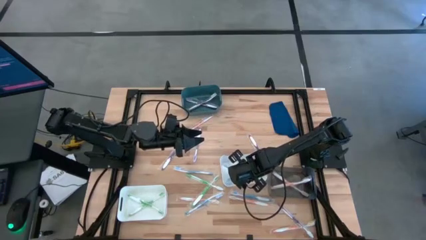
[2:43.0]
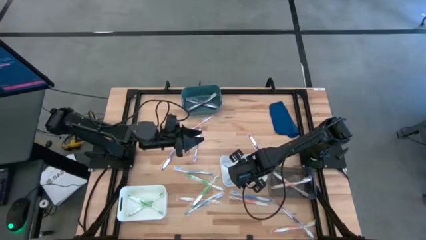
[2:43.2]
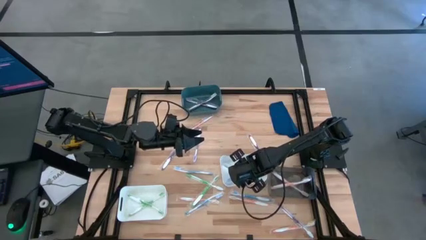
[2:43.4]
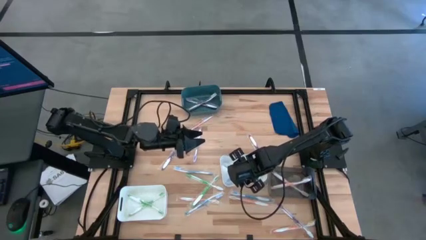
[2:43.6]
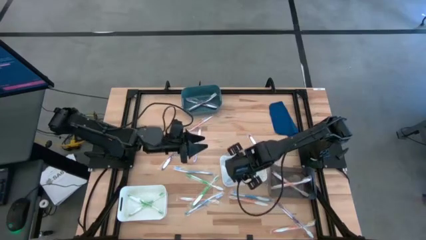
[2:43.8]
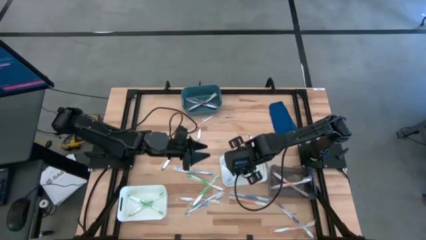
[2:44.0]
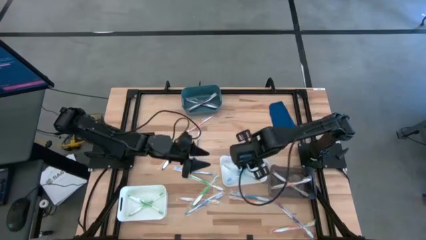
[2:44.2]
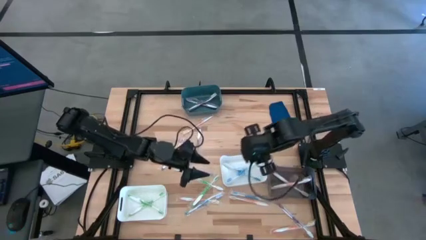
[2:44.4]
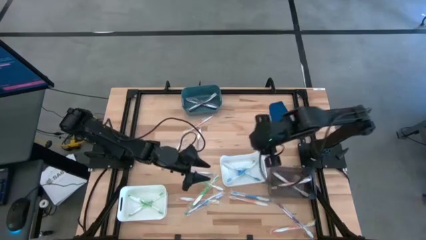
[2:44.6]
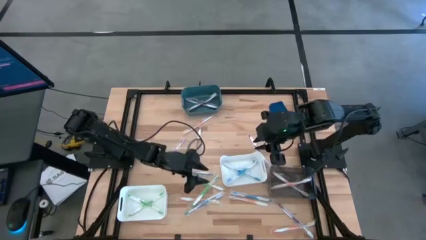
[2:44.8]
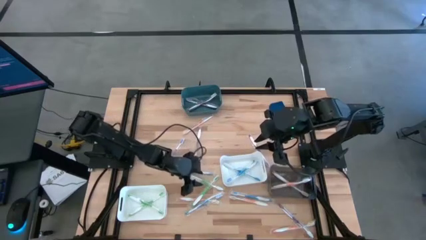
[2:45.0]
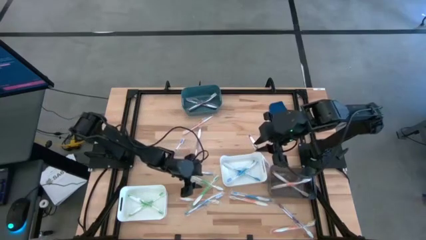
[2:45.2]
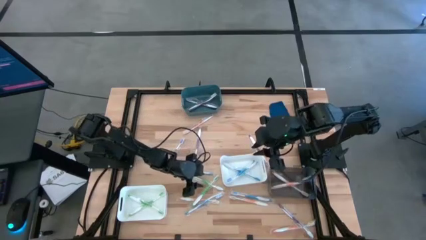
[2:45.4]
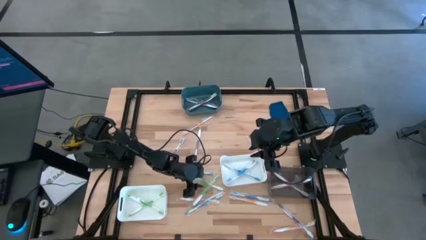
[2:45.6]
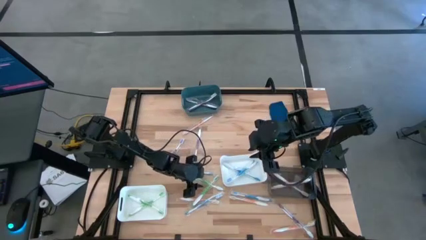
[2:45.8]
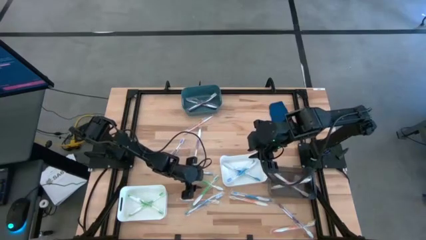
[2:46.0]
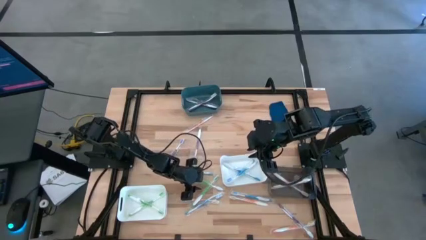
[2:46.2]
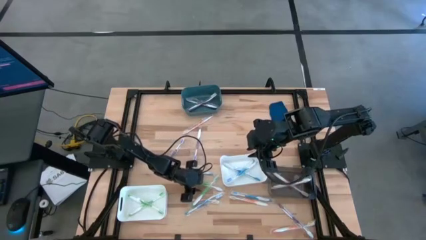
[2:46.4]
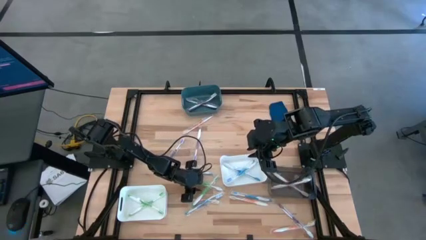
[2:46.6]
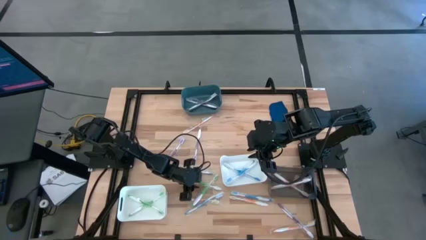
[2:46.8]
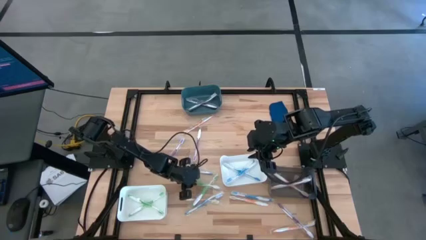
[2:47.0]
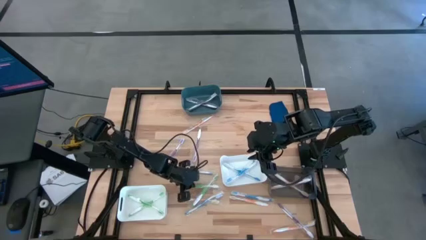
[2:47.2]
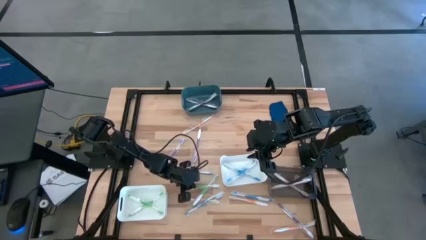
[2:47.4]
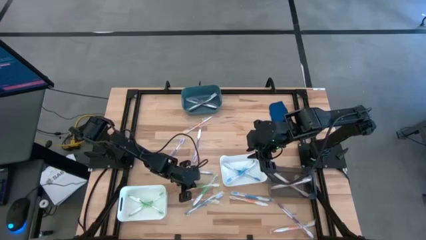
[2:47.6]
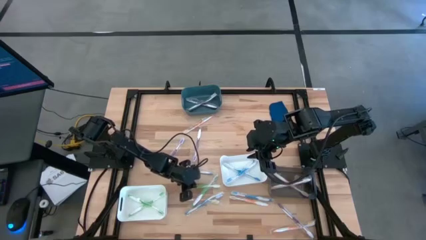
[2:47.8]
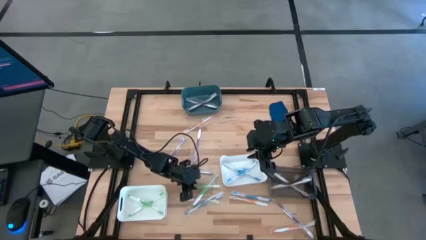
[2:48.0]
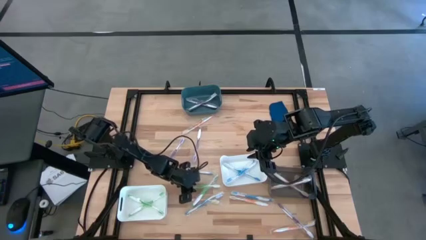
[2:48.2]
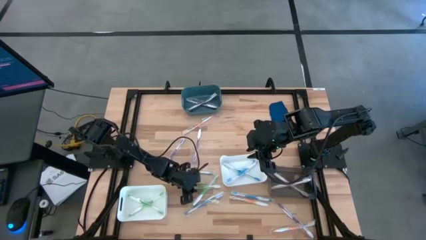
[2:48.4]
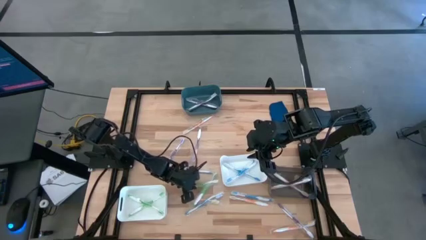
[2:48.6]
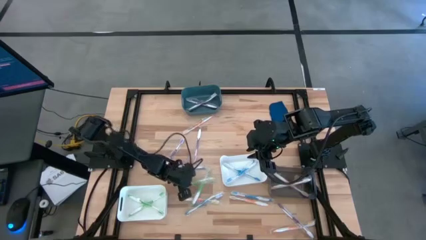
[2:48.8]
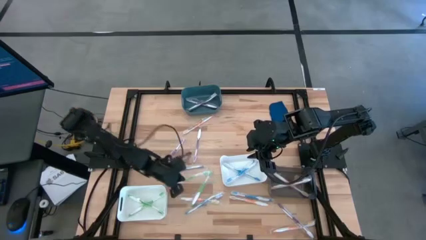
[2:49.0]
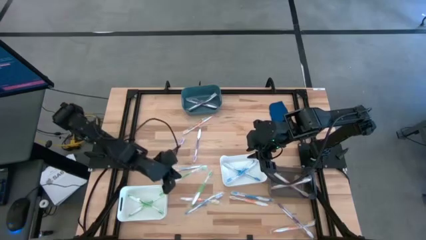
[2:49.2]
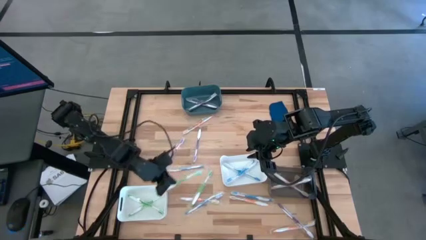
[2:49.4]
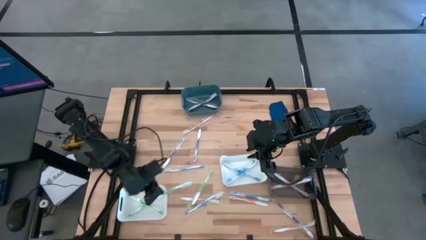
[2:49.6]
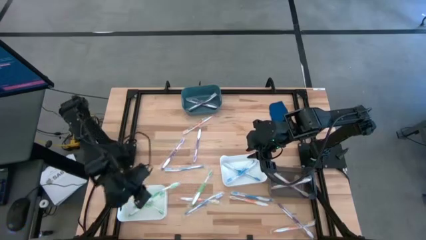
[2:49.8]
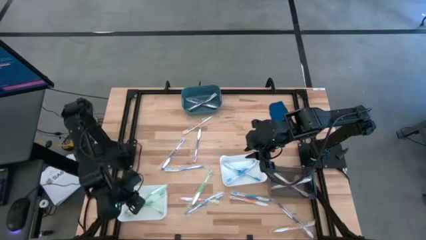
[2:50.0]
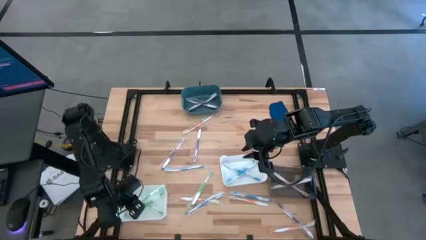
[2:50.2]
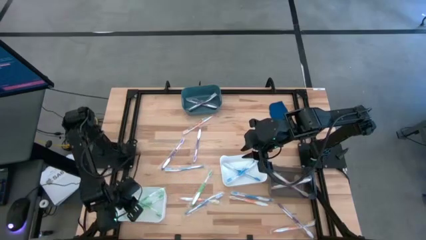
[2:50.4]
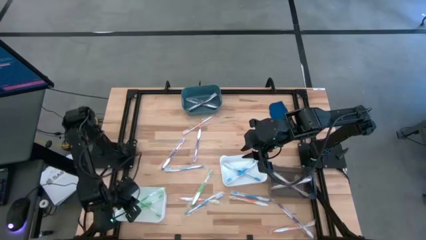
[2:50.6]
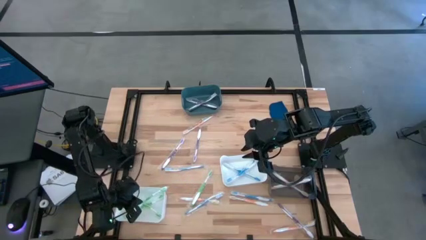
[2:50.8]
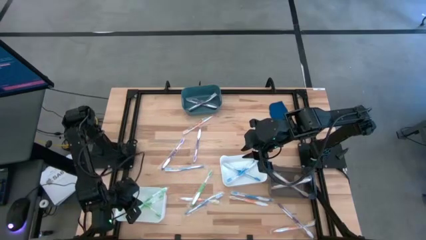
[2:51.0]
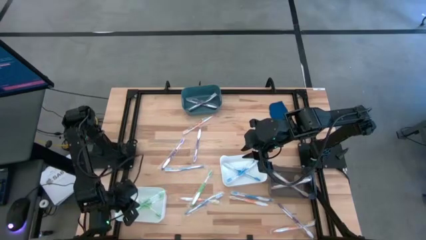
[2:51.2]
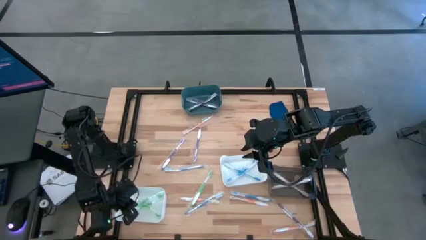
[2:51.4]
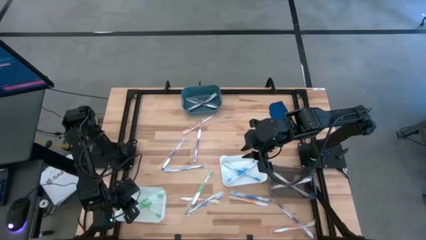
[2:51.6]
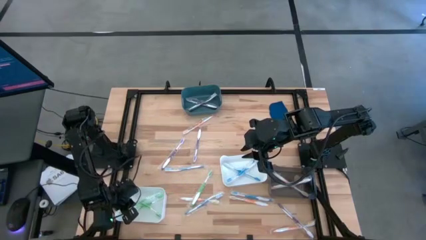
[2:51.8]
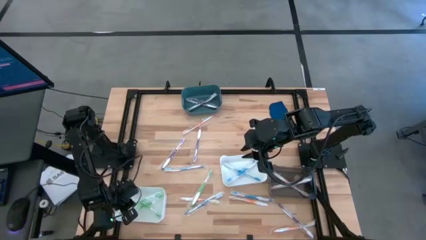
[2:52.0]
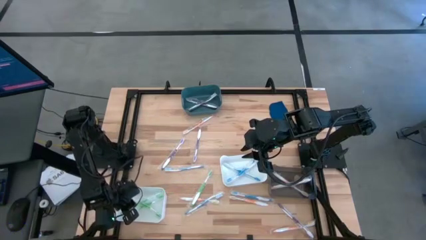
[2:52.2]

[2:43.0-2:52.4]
Task: Pick & Place Toothbrushes
Put the green toothbrush into the bottom white bin

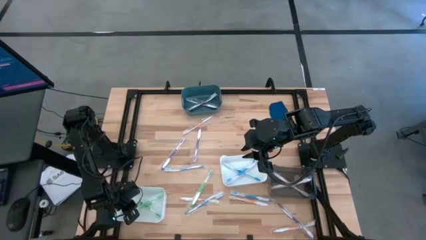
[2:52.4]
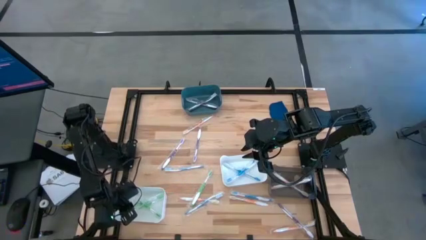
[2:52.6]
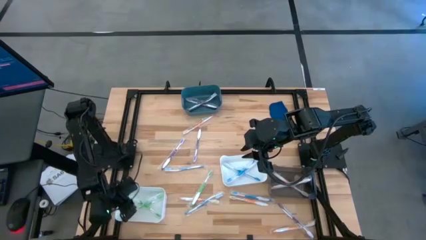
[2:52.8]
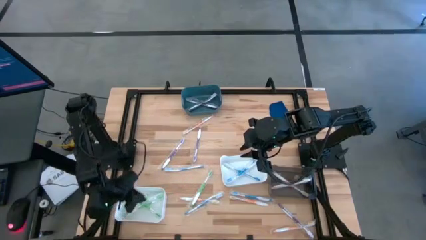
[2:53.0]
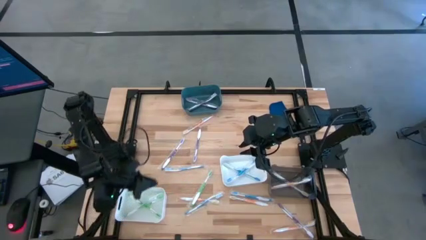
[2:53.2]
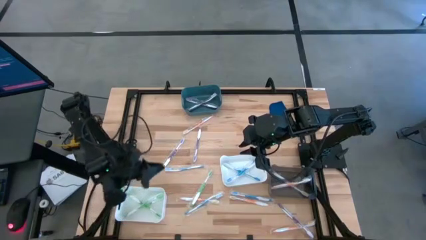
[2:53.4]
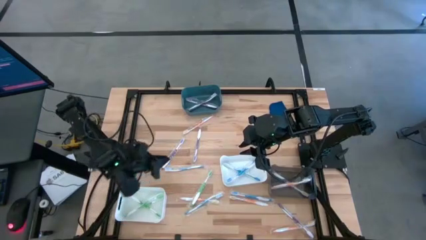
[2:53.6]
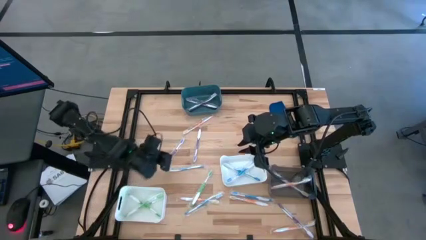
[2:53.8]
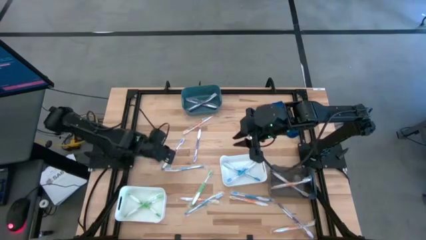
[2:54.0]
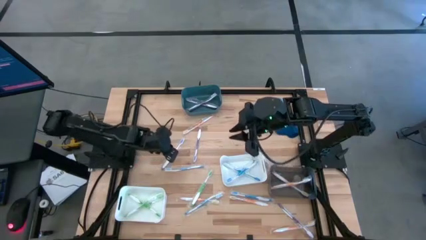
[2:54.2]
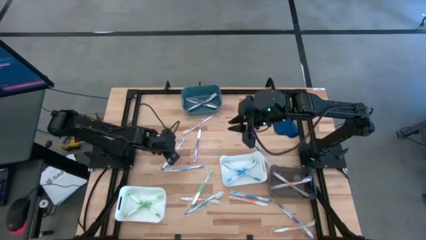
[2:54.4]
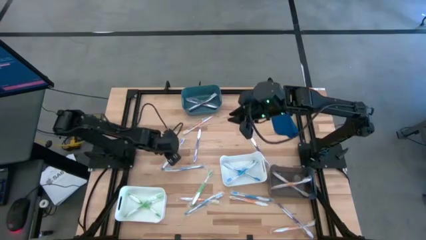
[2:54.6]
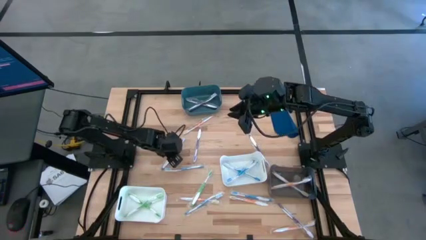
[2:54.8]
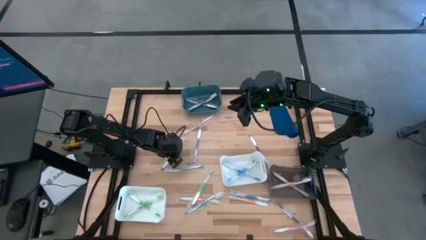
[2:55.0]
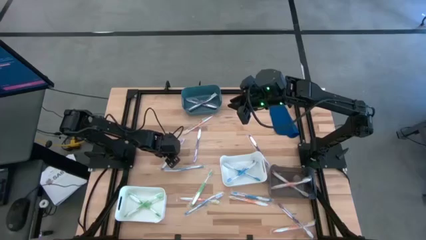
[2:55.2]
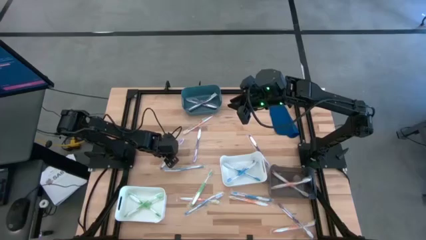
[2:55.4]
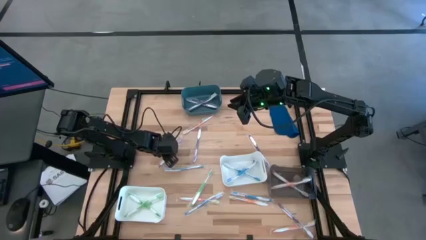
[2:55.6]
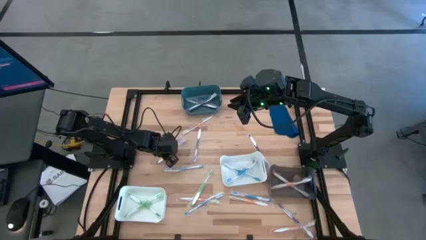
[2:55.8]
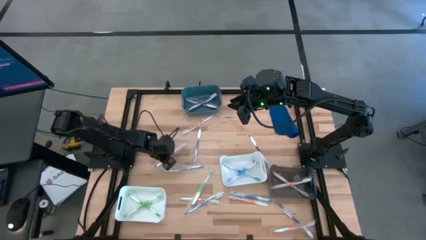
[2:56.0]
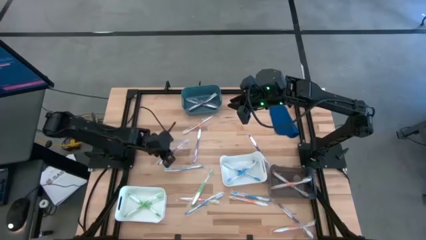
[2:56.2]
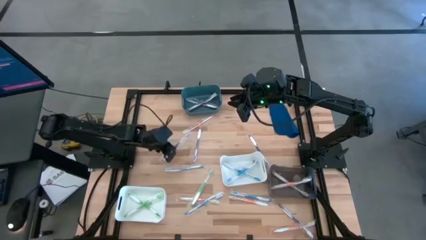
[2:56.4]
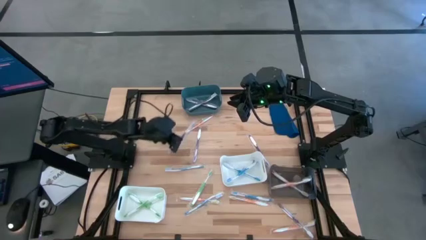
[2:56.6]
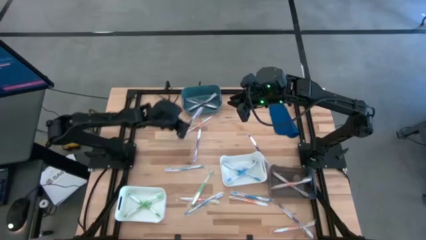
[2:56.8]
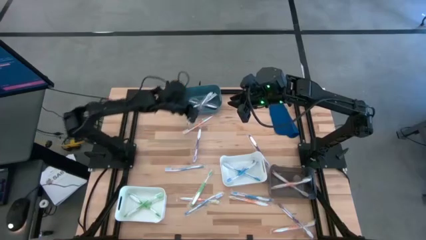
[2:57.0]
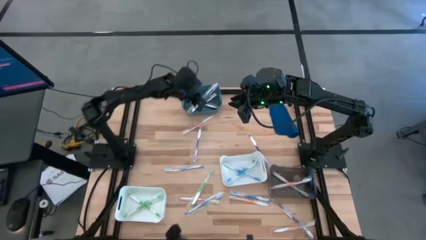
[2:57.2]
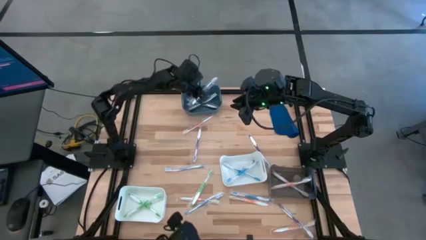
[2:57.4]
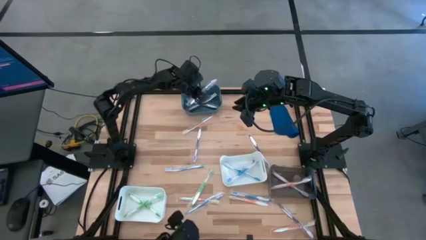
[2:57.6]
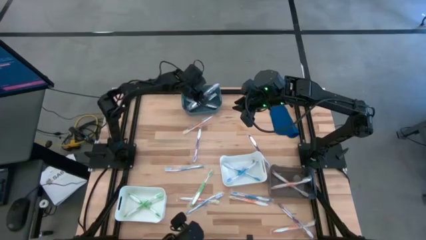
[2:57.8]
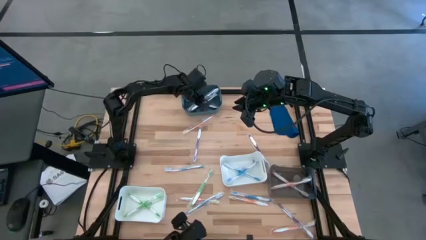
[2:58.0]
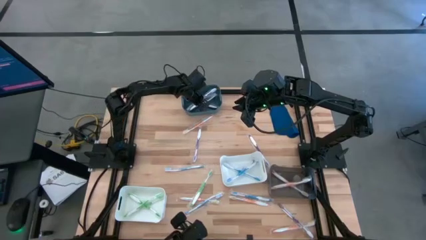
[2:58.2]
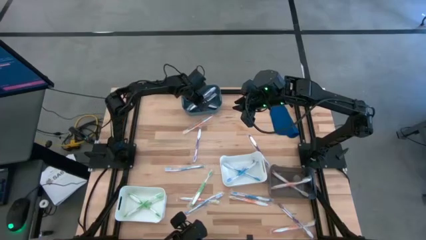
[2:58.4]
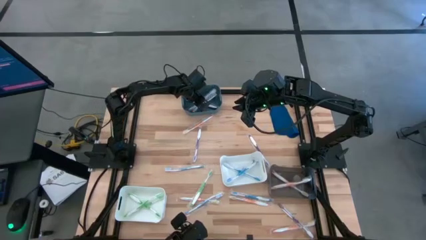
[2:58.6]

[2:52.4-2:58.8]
Put the violet toothbrush into the blue bin

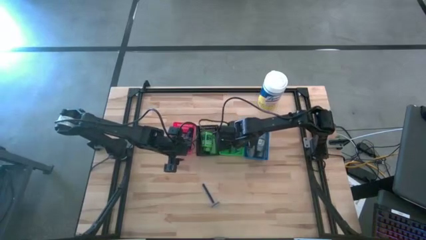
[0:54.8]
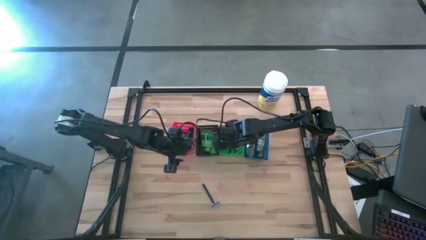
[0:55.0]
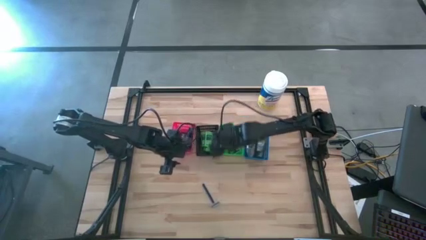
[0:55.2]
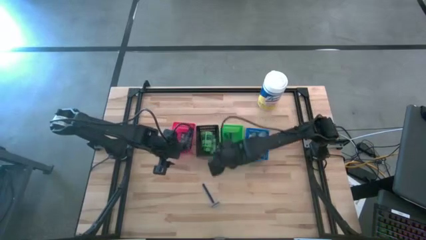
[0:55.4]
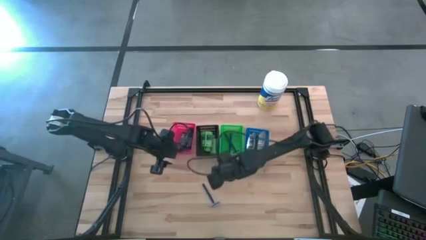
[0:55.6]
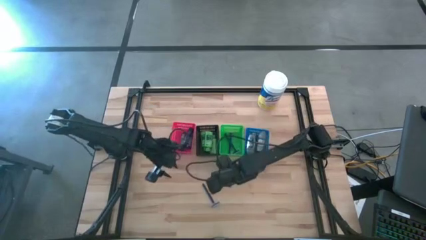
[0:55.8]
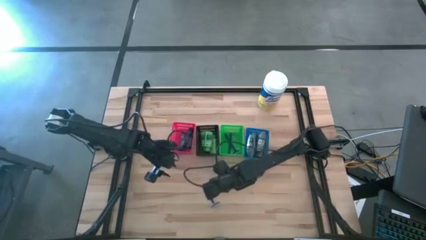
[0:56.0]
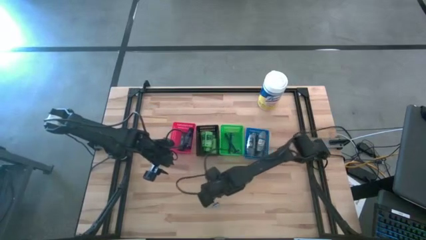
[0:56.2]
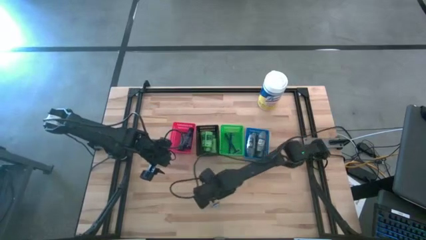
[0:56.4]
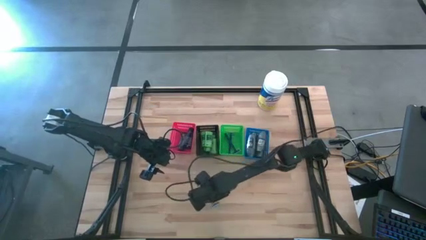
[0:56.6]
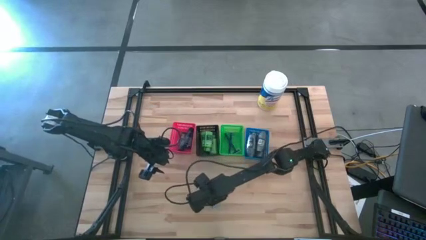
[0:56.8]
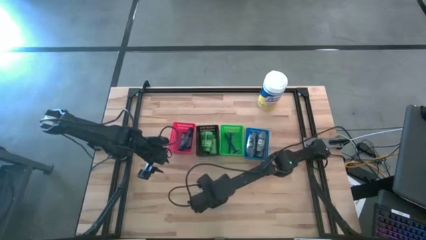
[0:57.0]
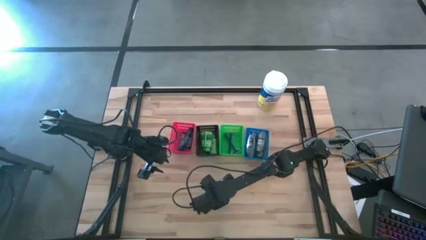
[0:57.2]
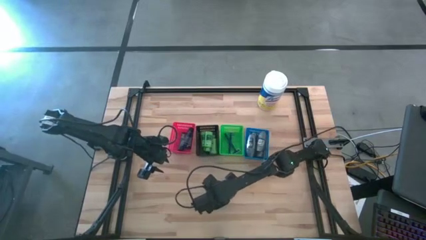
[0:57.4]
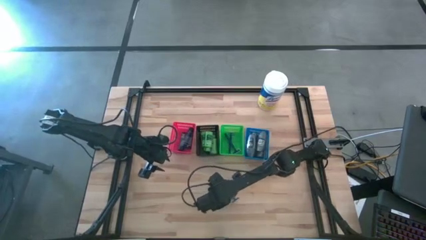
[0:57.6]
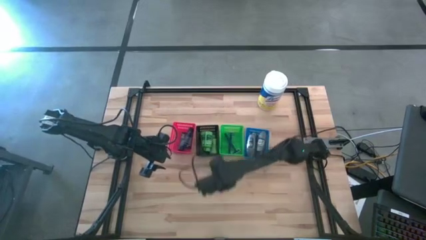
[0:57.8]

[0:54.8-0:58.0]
Task: Pick & Place Travel size toiletries
Put the blue razor into the green bin
